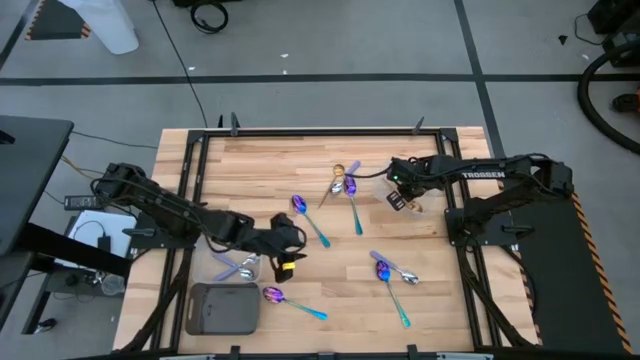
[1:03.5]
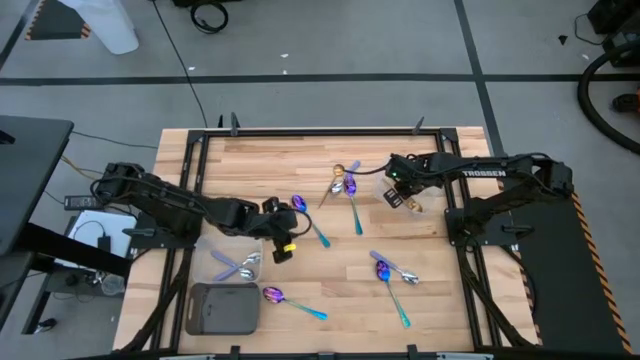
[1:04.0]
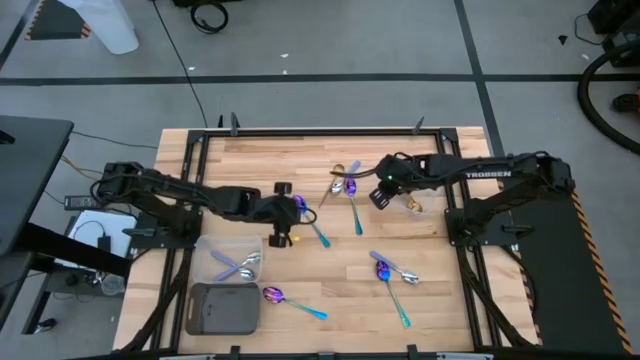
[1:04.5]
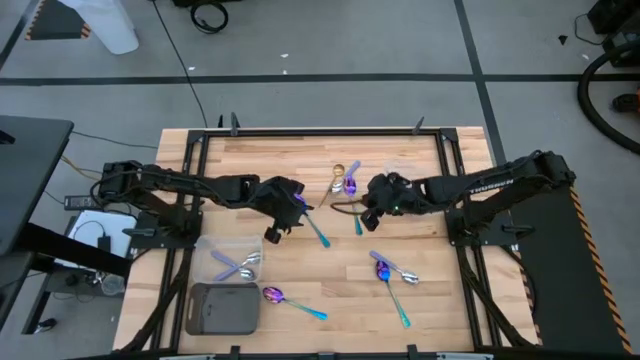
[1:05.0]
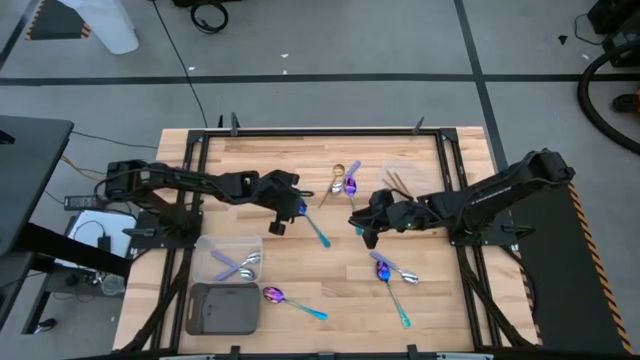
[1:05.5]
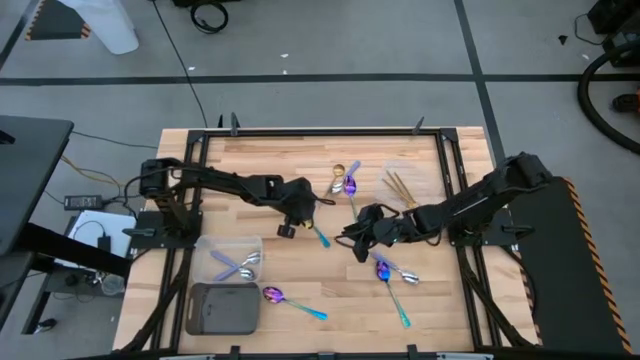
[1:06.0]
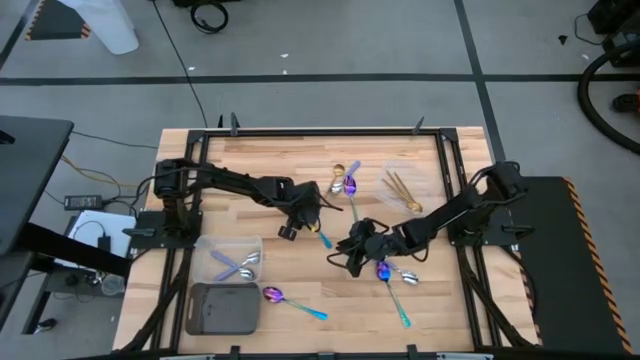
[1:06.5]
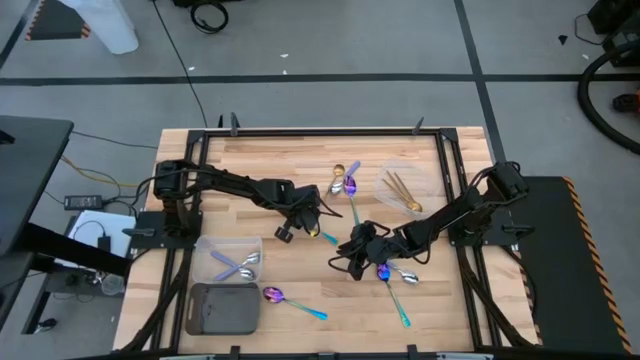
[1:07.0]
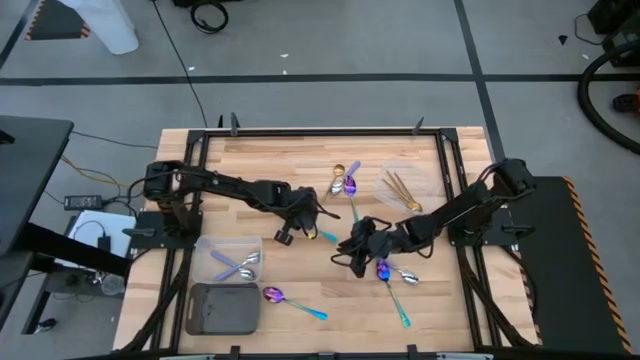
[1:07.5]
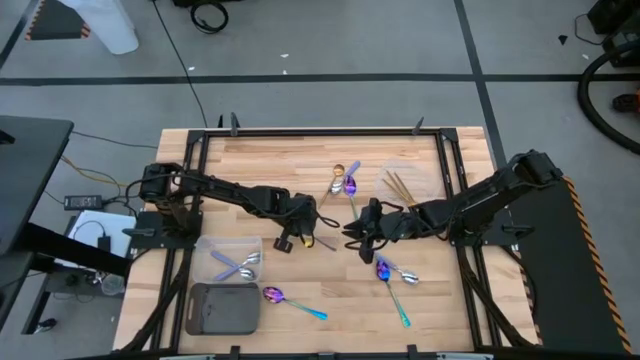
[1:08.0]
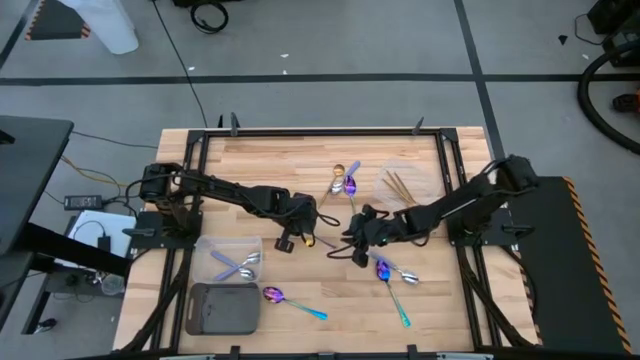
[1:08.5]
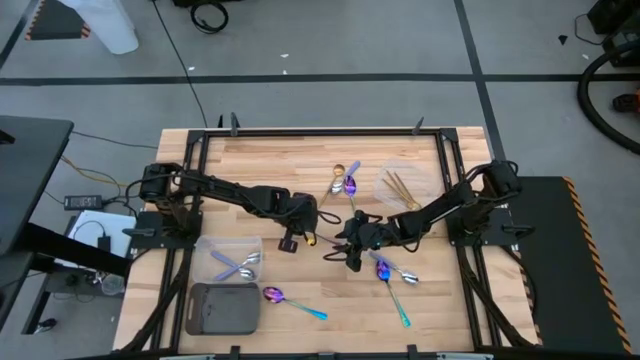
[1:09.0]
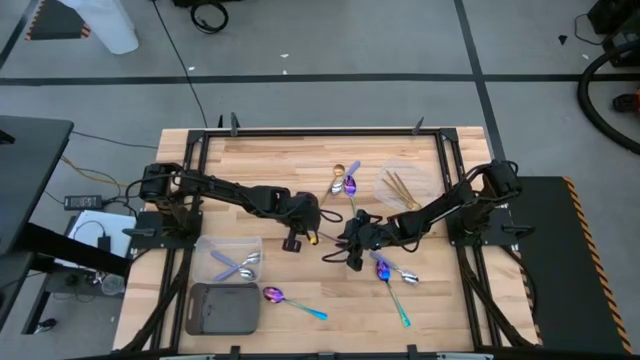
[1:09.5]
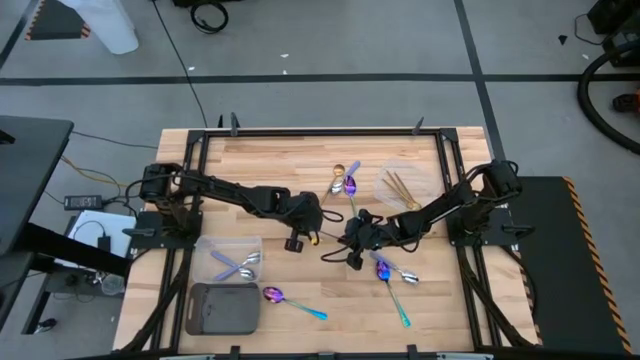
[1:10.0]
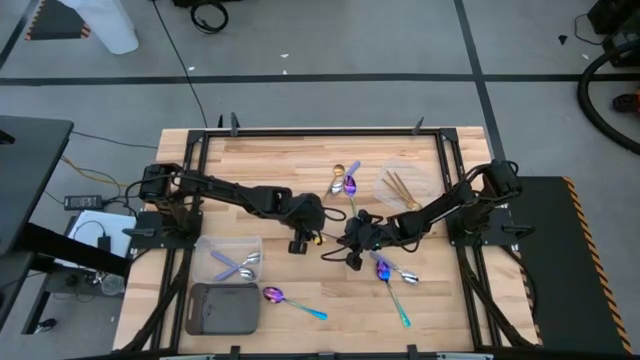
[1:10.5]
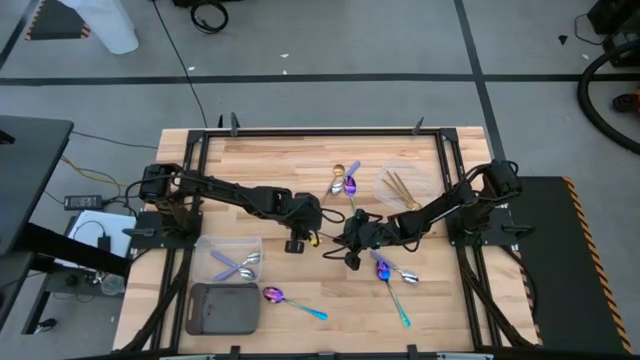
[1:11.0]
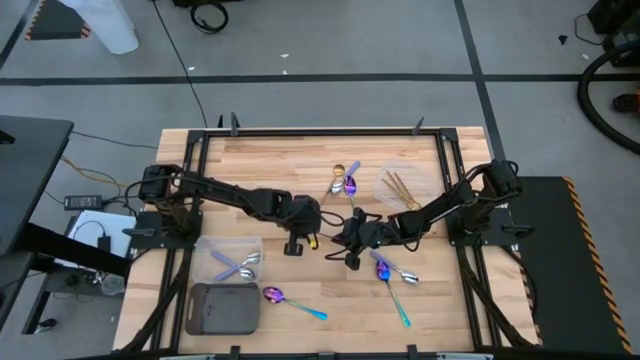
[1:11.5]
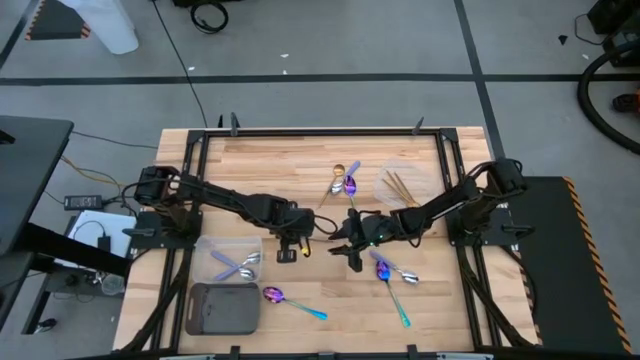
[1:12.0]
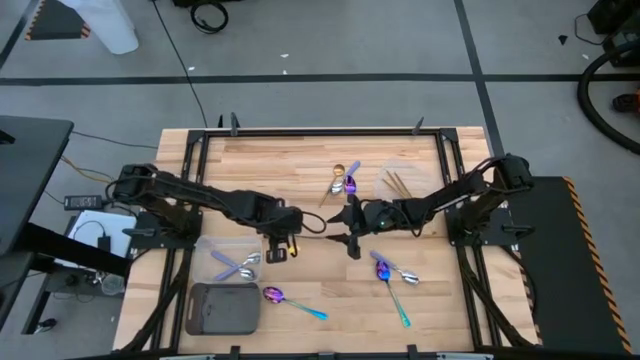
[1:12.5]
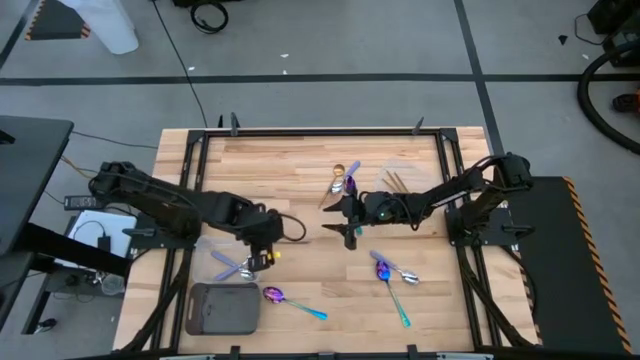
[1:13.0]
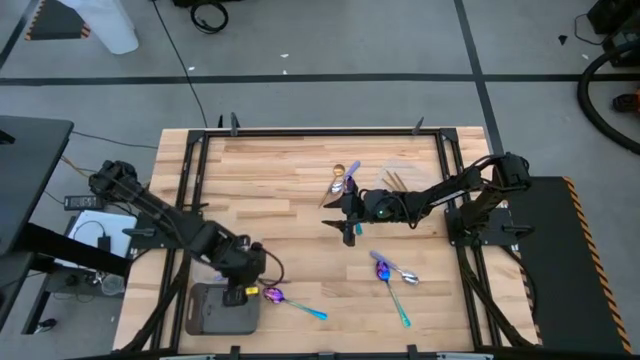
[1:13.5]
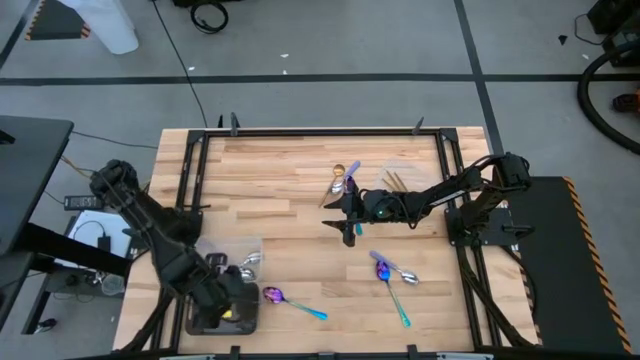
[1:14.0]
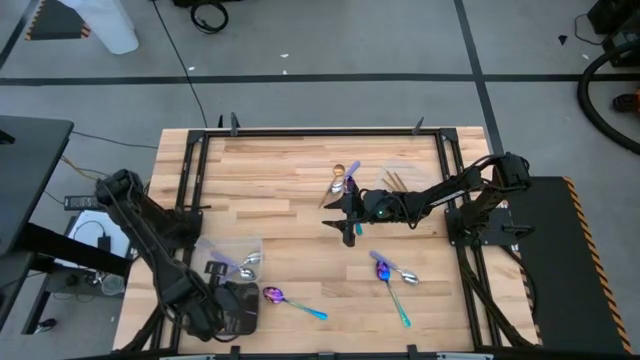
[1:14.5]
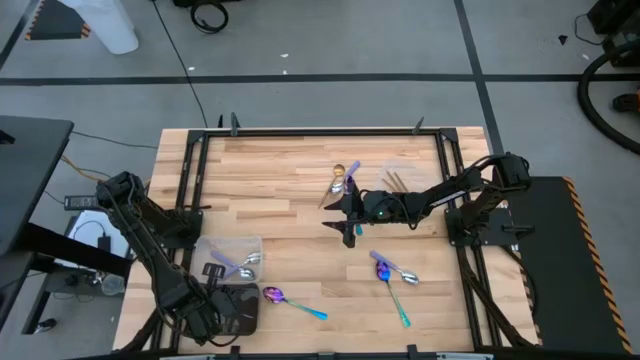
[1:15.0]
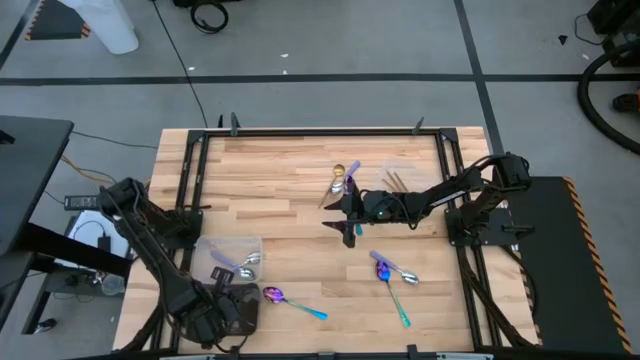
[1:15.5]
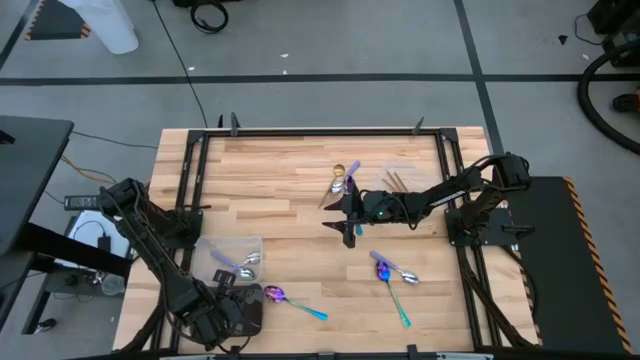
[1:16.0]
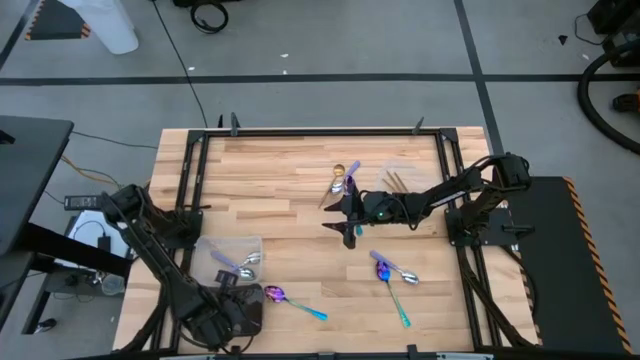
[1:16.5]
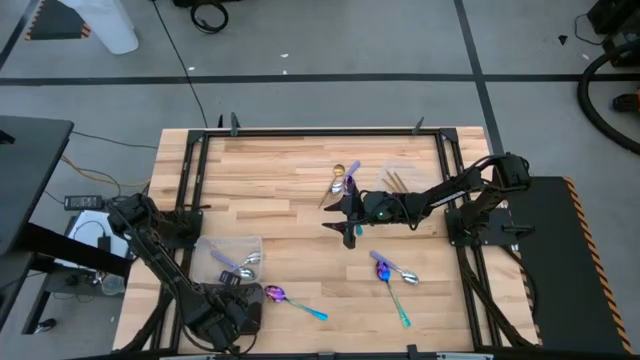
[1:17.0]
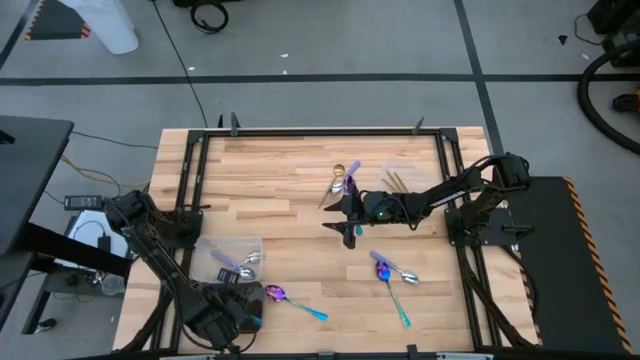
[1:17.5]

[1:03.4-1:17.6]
Task: Sort silverware by color (type)
Put the blue spoon into the black bin

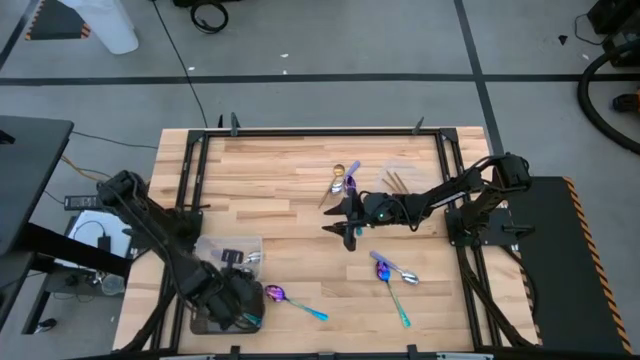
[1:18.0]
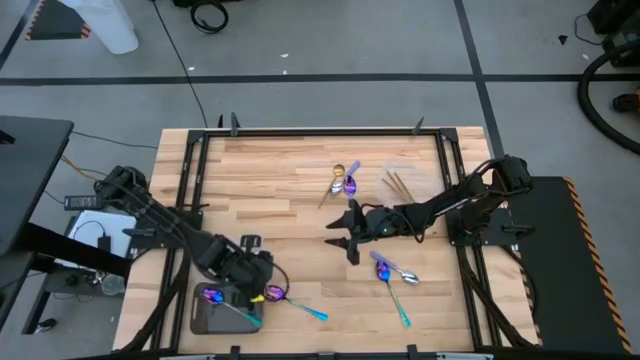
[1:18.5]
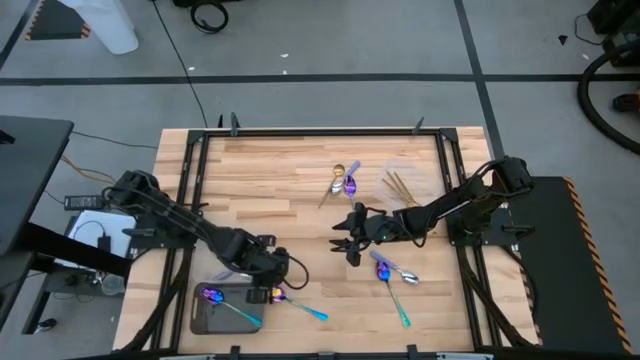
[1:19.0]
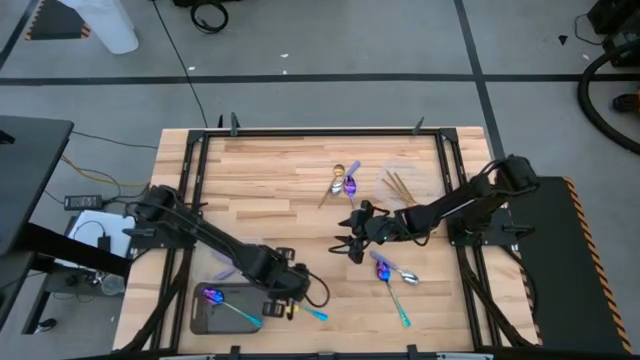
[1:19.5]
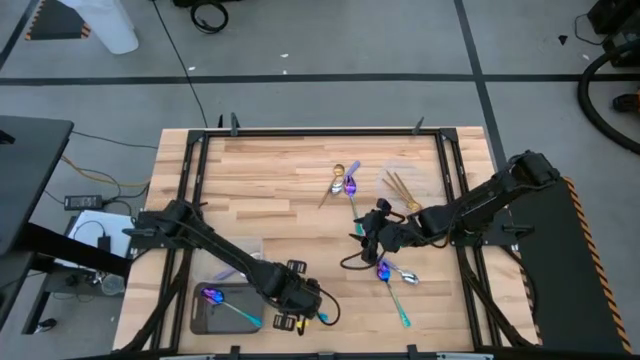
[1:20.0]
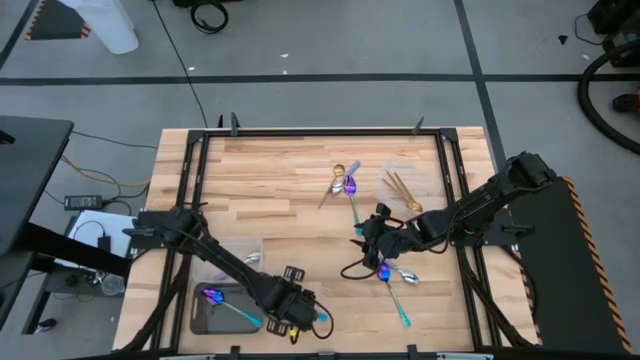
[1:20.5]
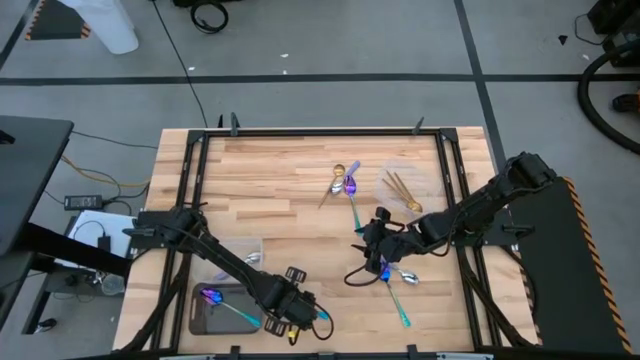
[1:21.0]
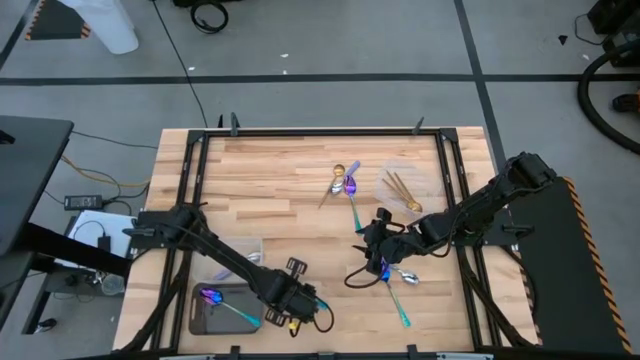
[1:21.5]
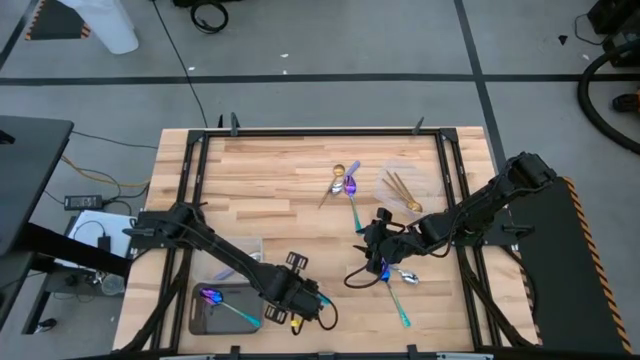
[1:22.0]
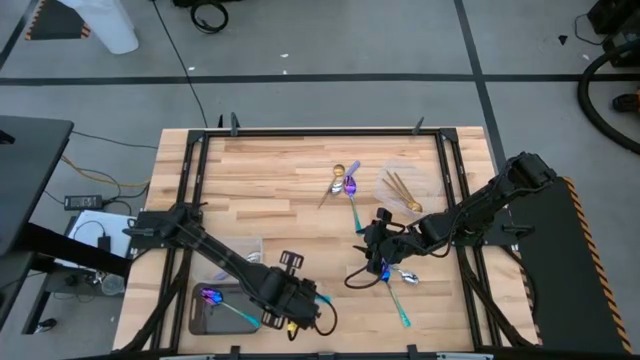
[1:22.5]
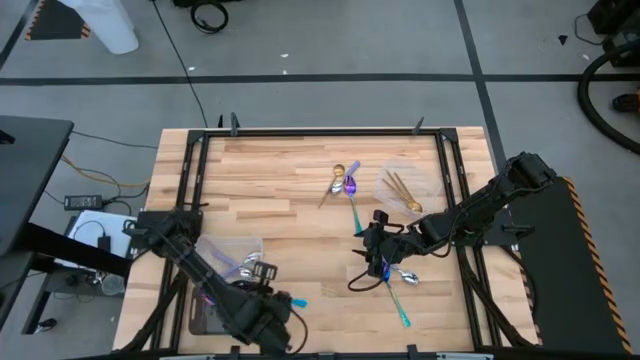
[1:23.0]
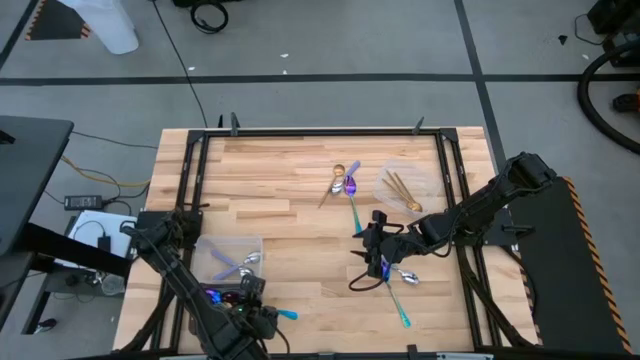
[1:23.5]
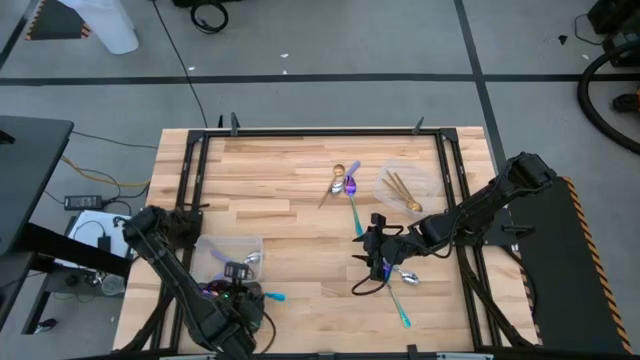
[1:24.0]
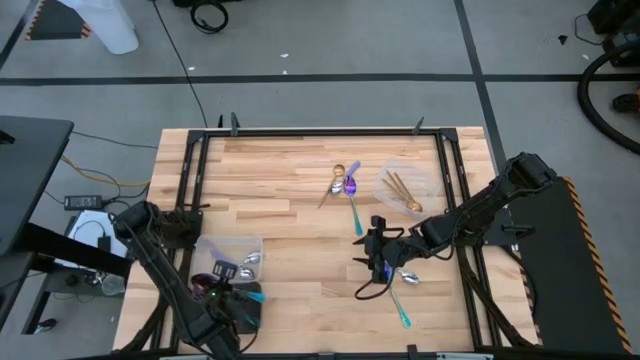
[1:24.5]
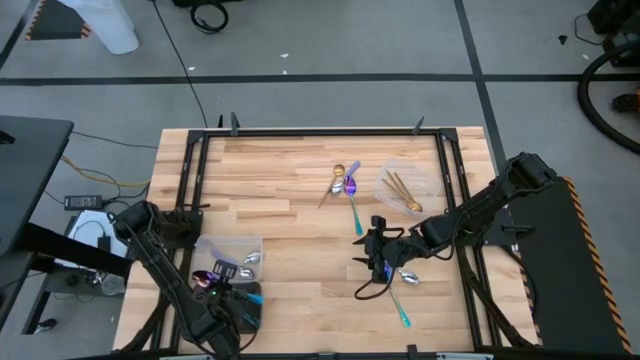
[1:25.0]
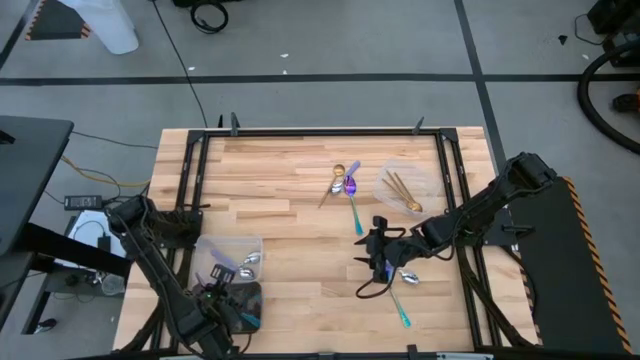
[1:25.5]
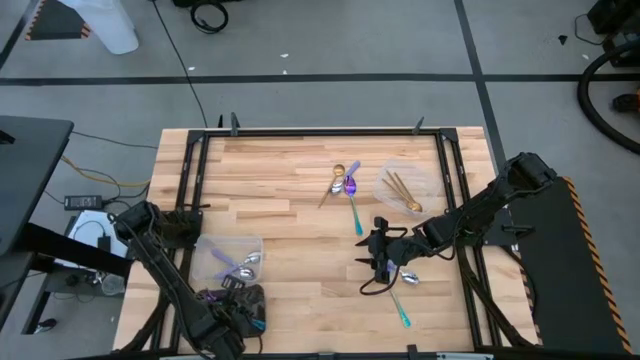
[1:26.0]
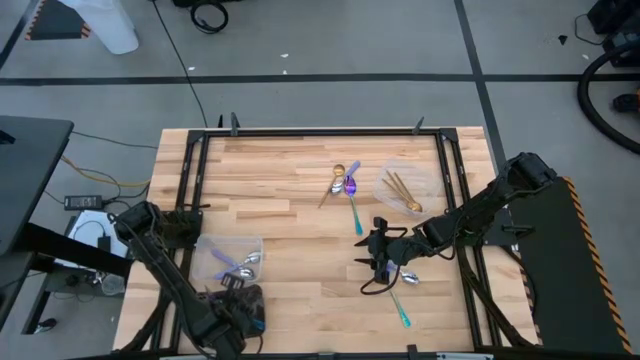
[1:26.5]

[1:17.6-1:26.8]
Put the blue spoon into the black bin
